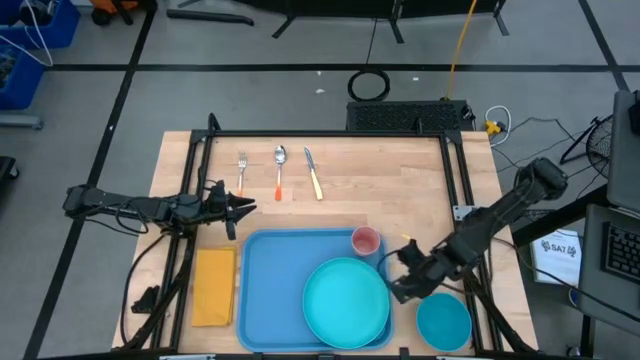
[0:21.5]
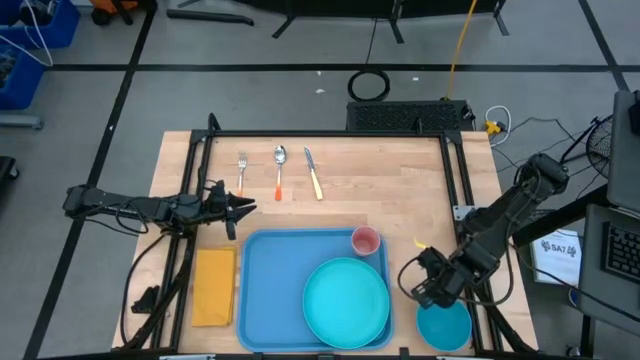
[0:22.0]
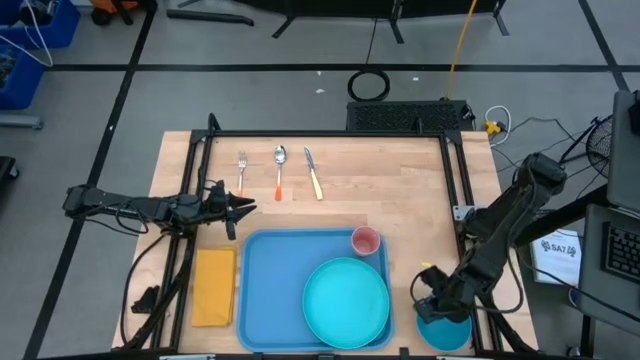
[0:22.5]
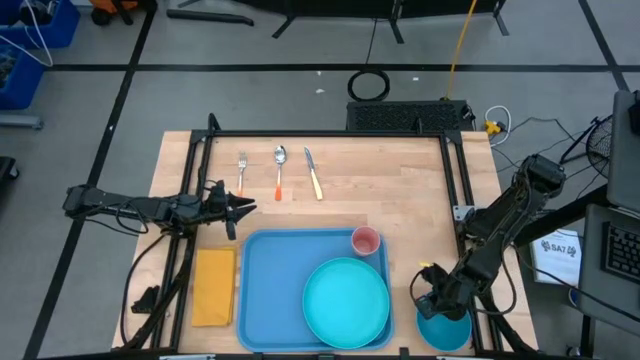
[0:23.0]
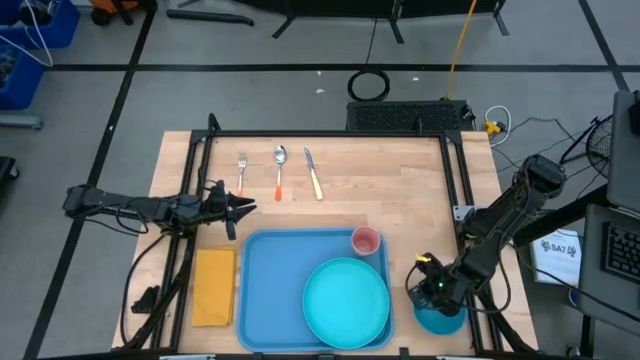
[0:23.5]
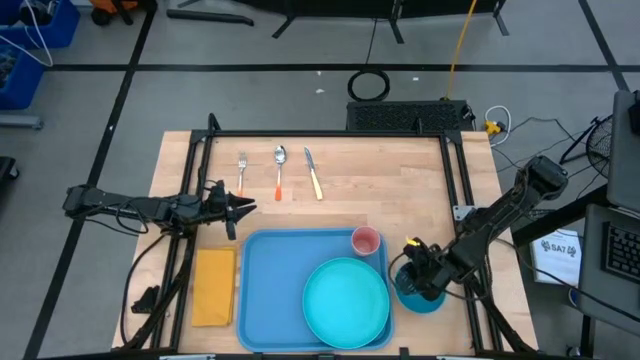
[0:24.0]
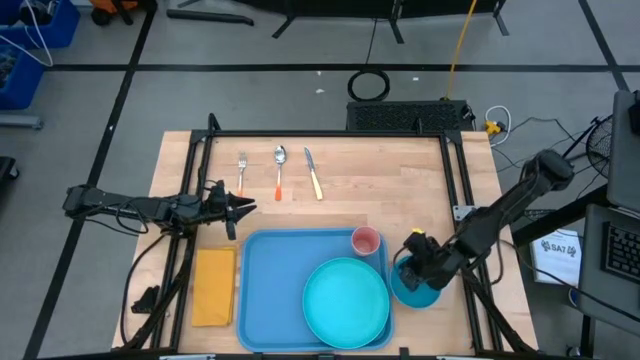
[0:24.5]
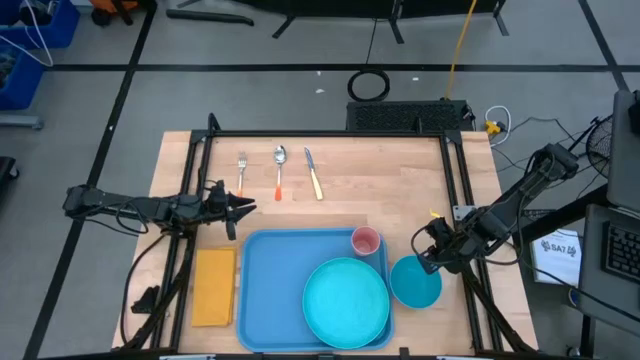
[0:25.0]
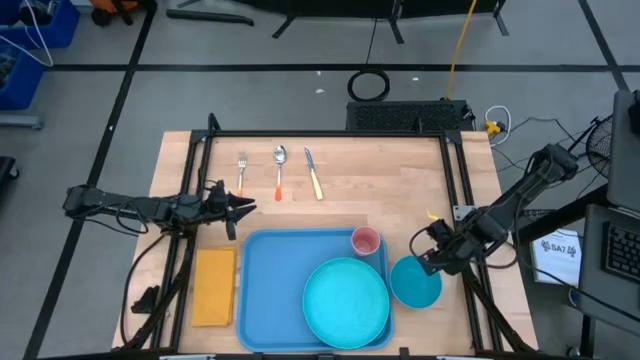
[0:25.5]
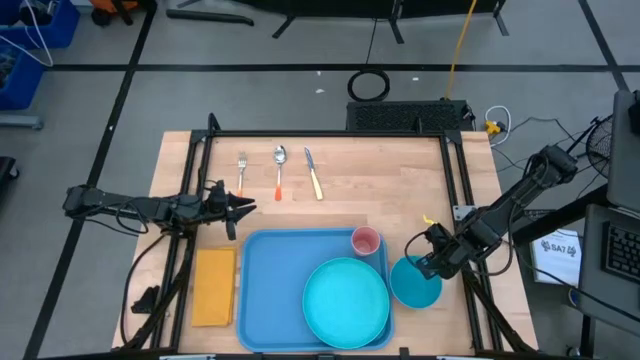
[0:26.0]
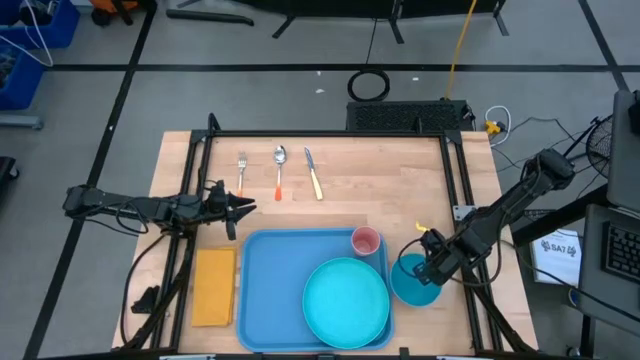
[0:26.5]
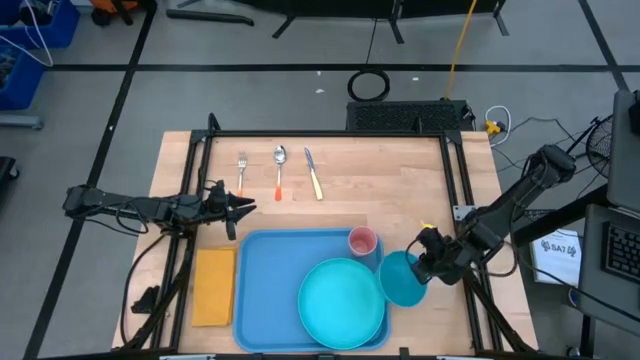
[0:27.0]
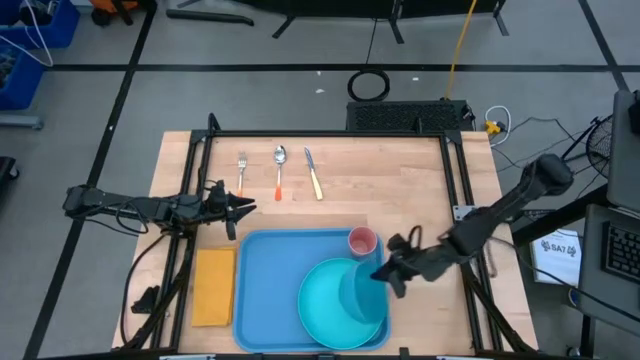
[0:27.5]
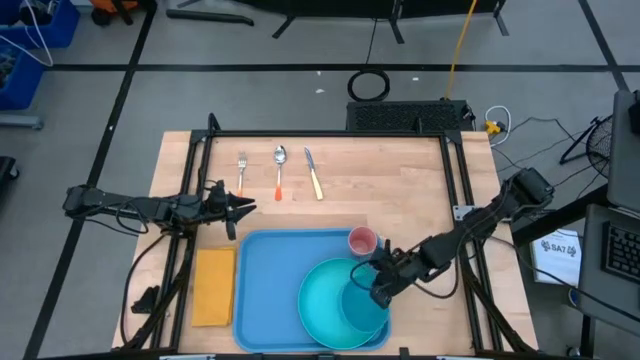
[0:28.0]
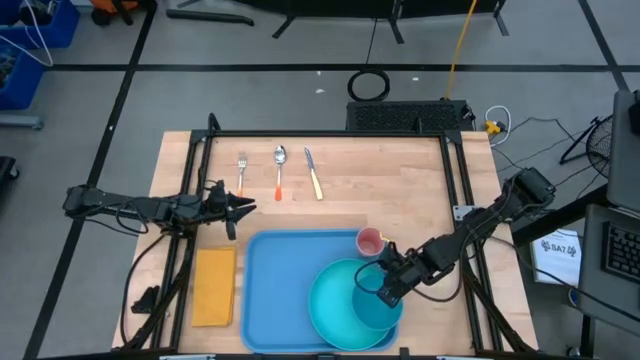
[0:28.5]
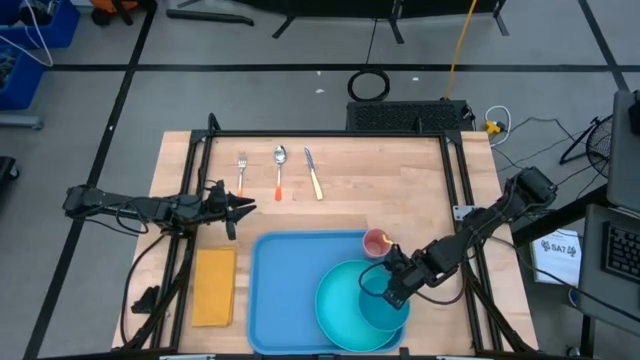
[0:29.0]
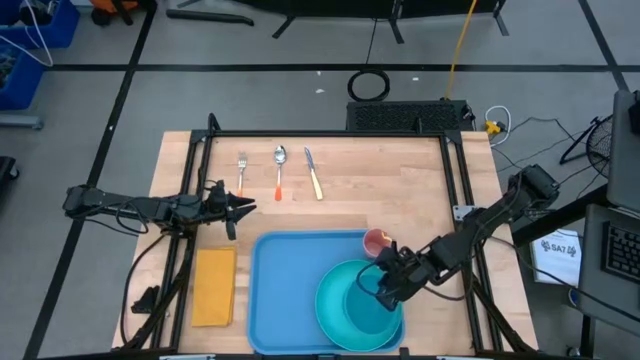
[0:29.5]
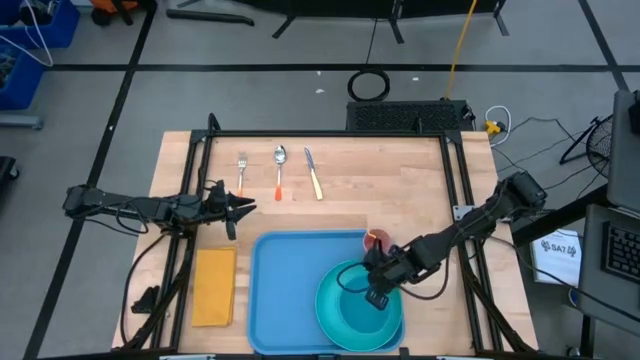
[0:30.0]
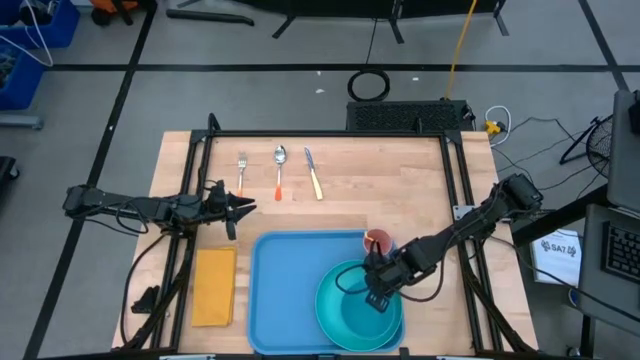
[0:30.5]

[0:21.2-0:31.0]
Task: Set up tray
Stack the blue bowl on top of the blue plate on the blue serving tray

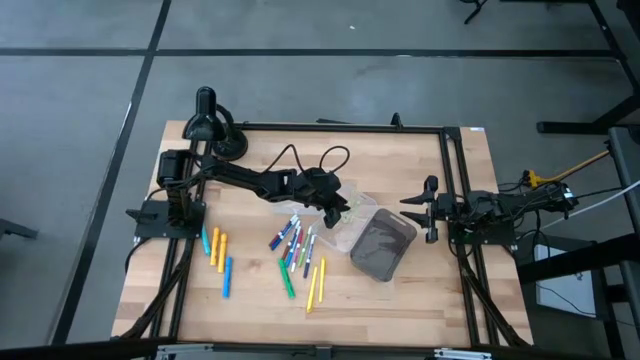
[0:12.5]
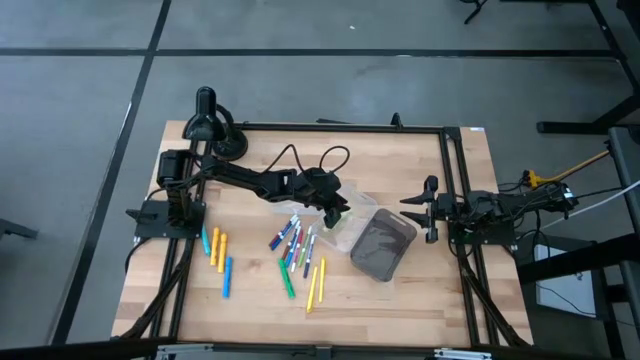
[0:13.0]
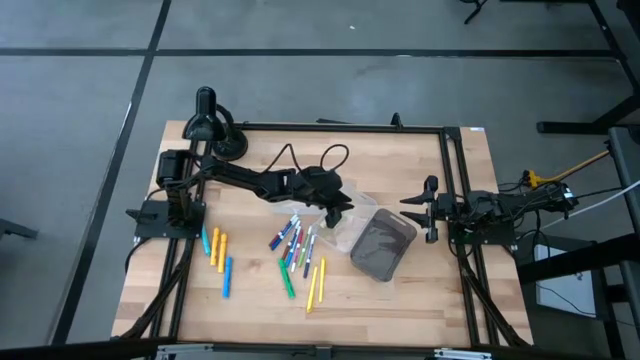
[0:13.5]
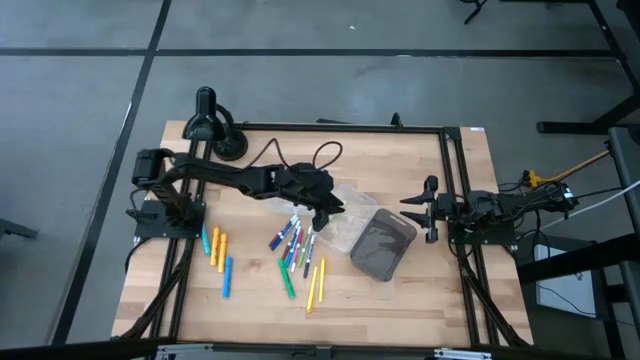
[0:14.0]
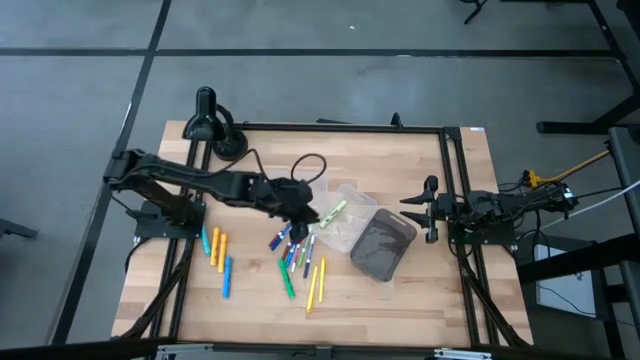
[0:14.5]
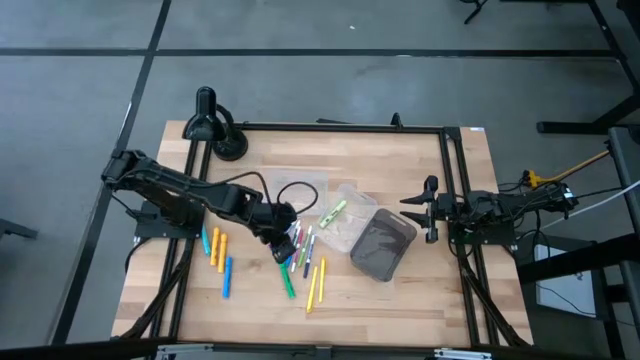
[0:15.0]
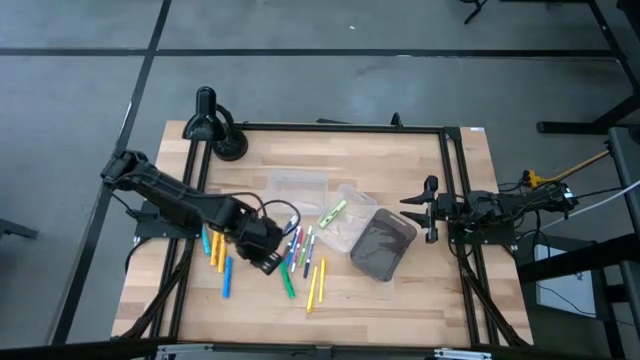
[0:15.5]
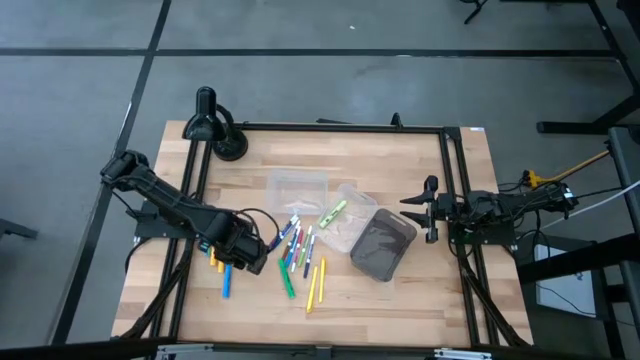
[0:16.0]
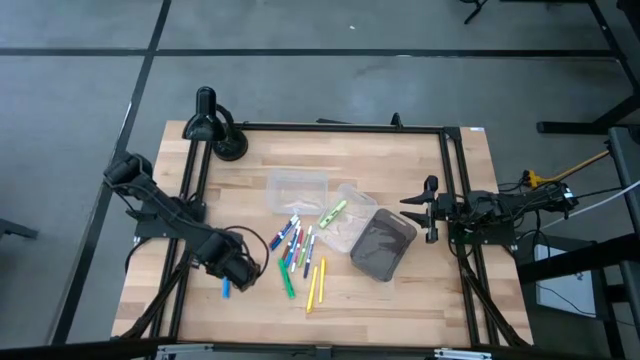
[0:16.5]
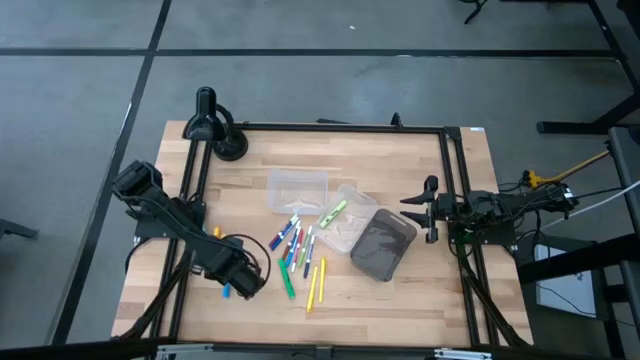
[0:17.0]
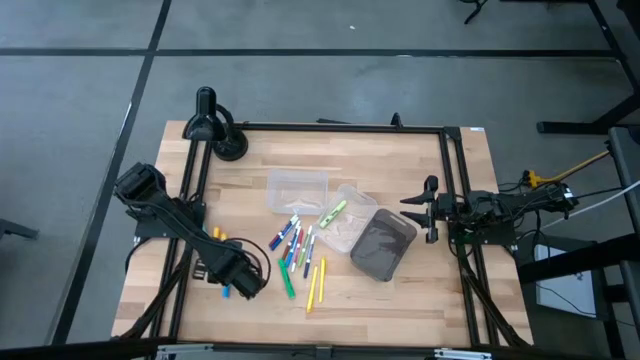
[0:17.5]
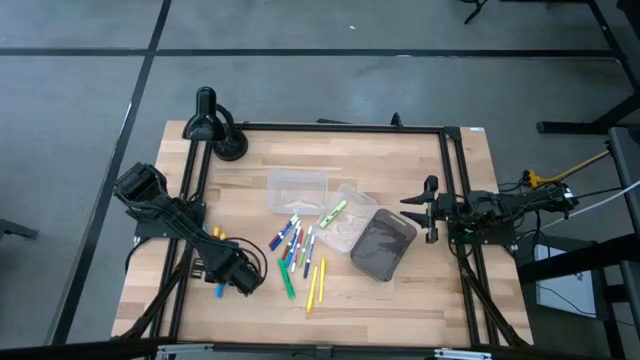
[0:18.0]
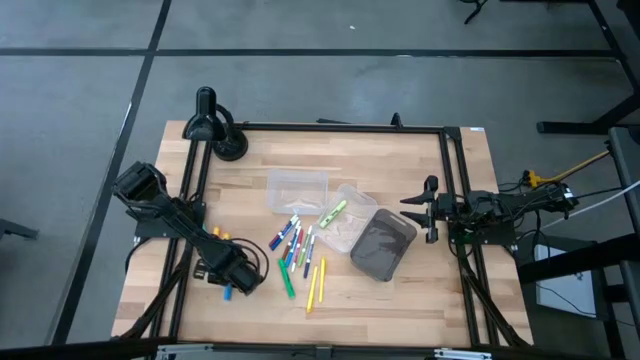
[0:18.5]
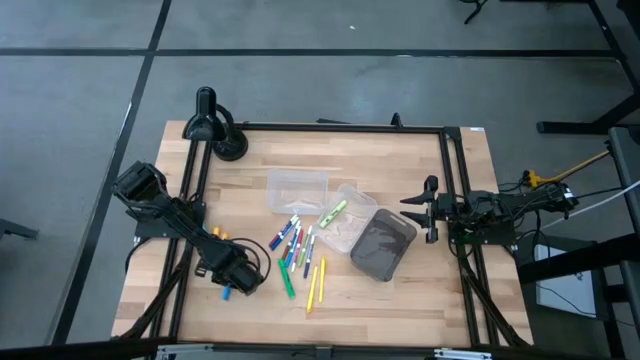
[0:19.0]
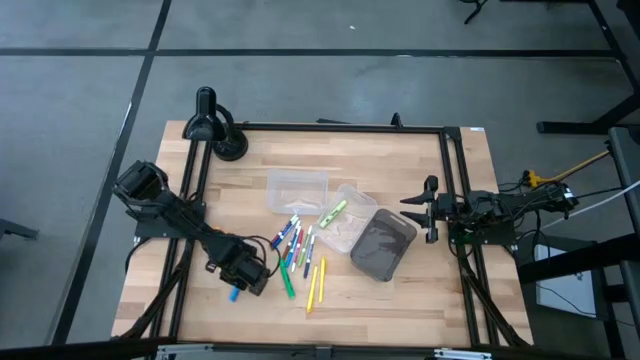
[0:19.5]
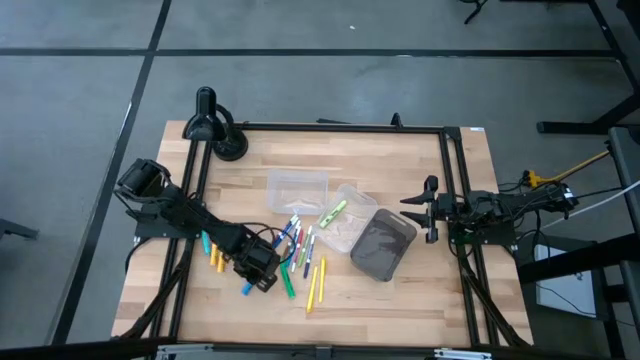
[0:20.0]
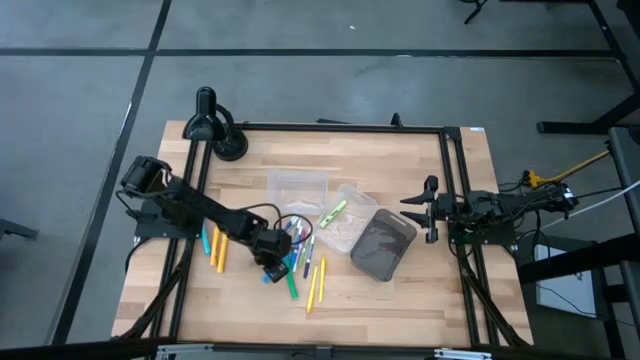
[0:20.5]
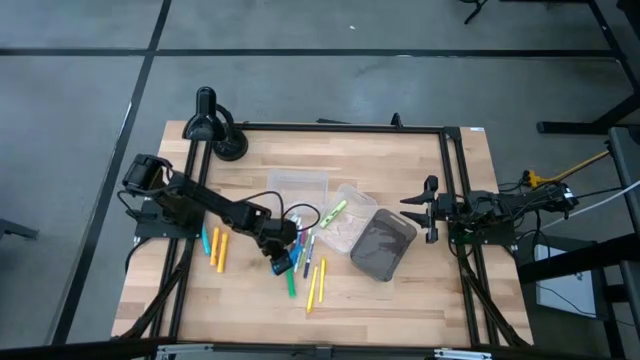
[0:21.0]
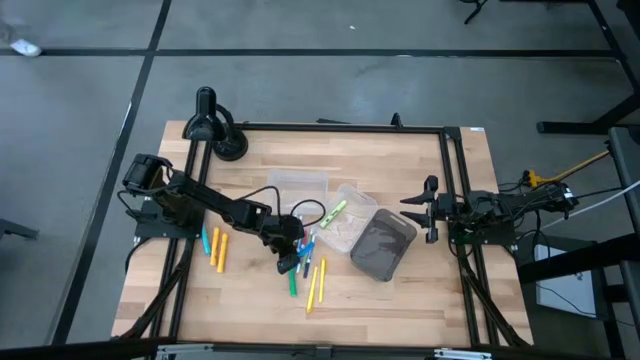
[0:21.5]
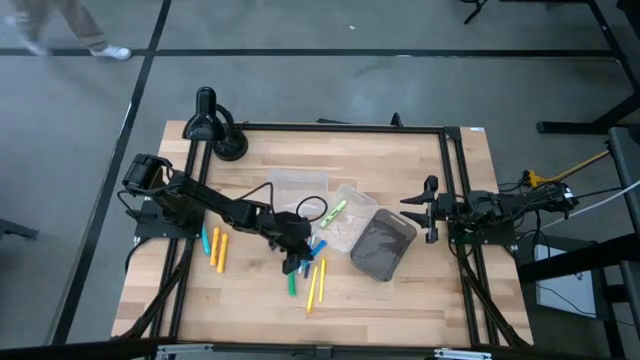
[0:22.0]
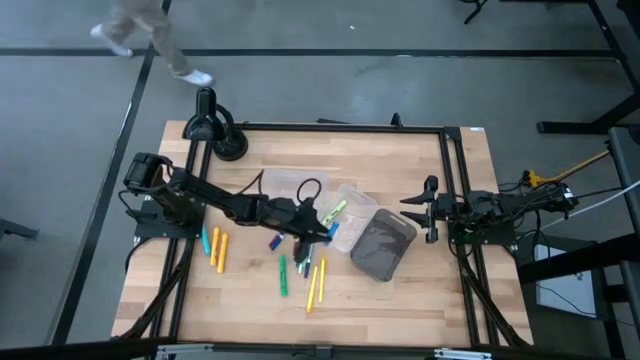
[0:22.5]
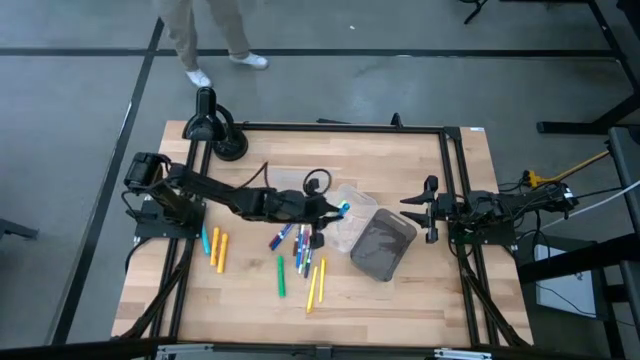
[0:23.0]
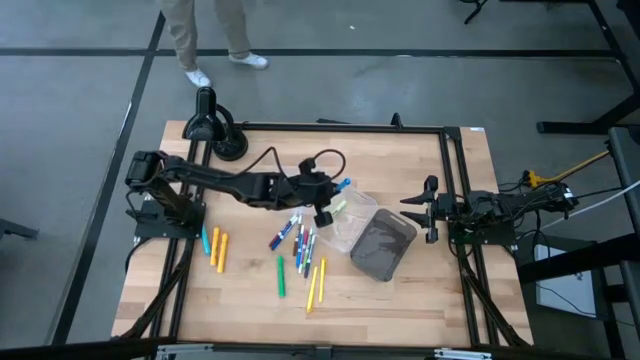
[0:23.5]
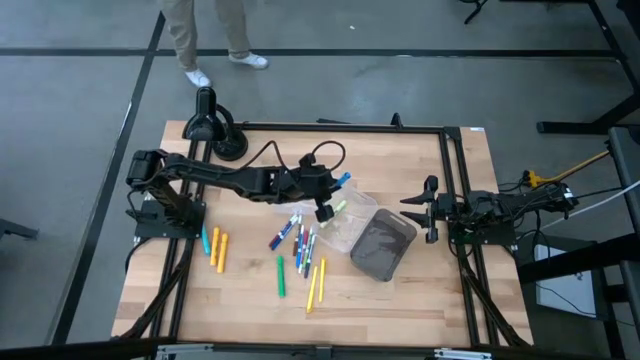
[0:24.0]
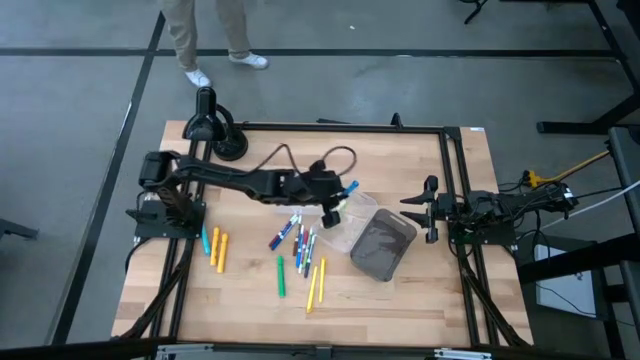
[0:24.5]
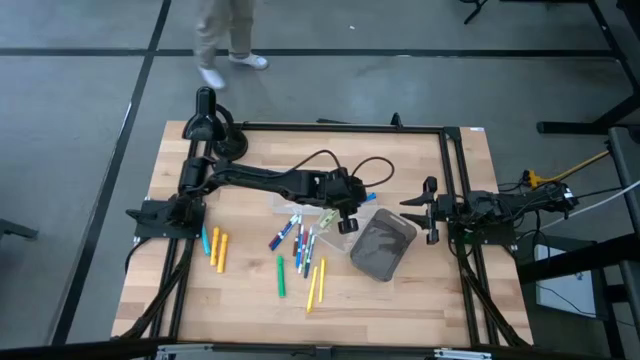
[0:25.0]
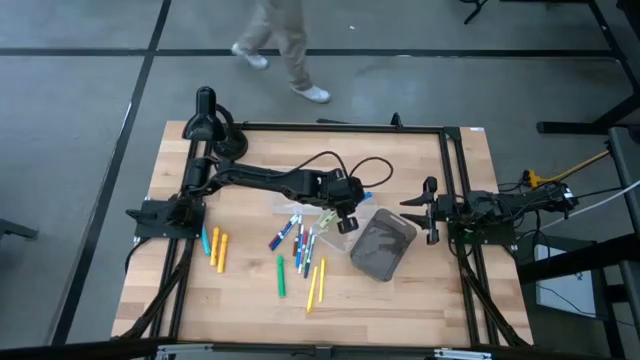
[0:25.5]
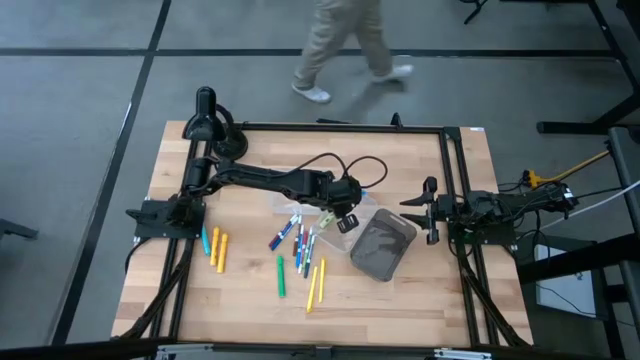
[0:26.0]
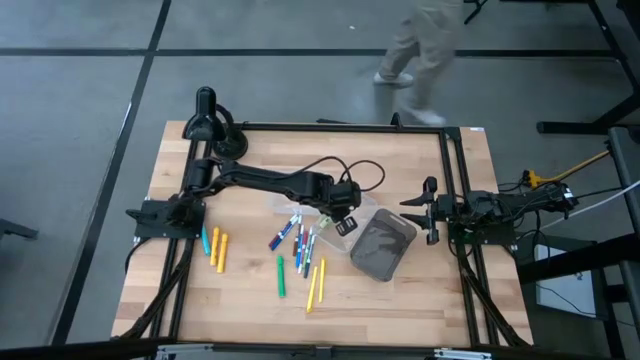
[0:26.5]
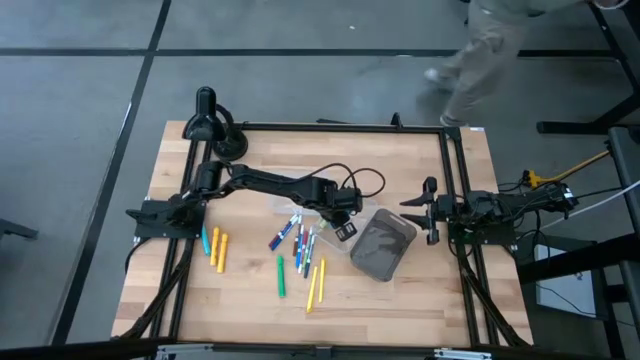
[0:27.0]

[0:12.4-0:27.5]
Task: Pick & Place Markers
Put the blue highlighter pen into the right transparent bin
